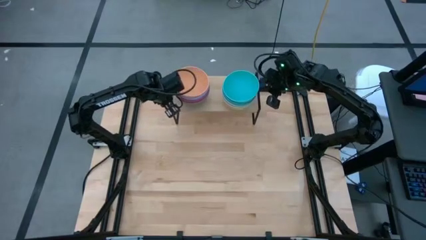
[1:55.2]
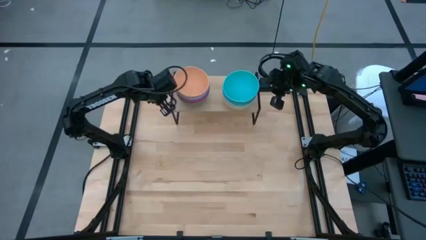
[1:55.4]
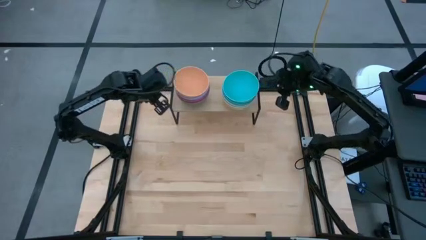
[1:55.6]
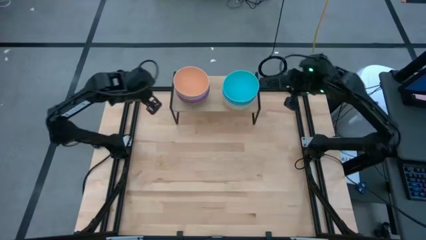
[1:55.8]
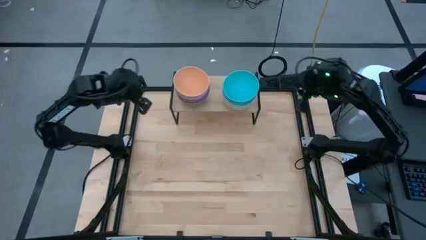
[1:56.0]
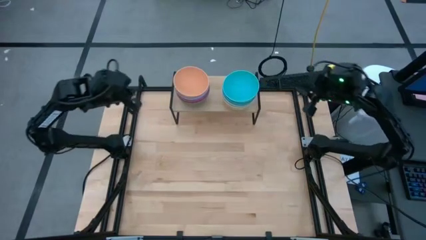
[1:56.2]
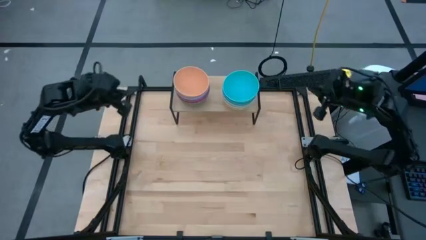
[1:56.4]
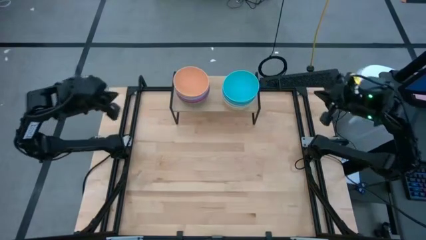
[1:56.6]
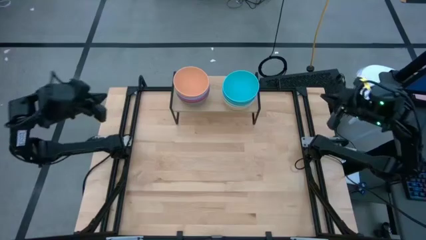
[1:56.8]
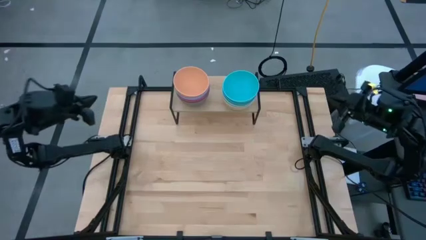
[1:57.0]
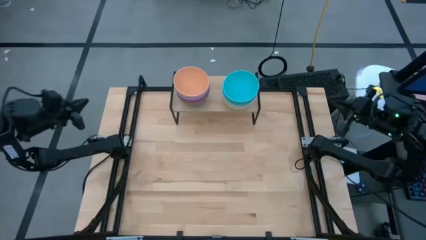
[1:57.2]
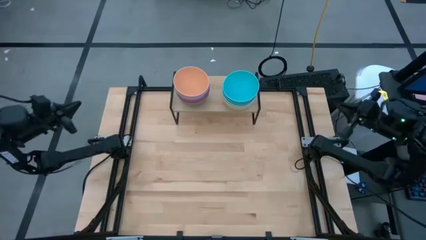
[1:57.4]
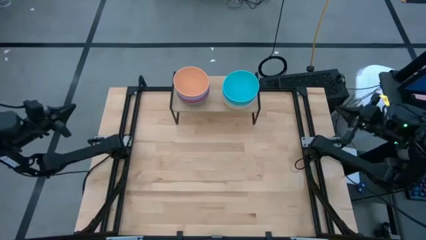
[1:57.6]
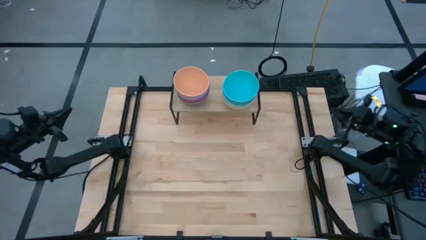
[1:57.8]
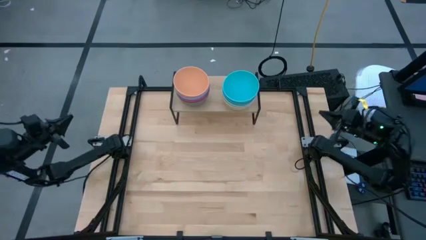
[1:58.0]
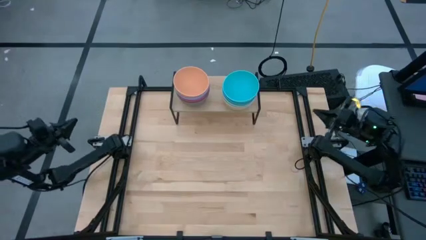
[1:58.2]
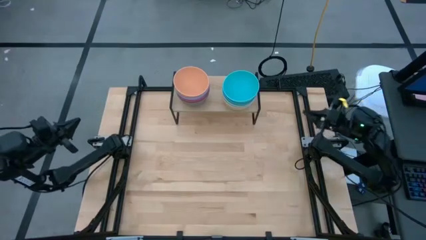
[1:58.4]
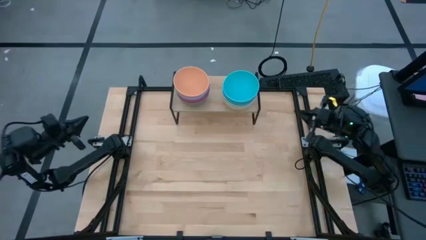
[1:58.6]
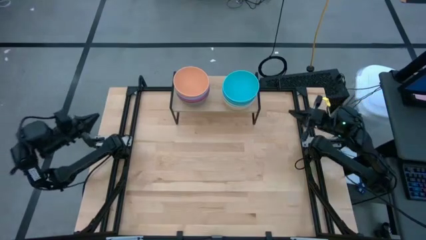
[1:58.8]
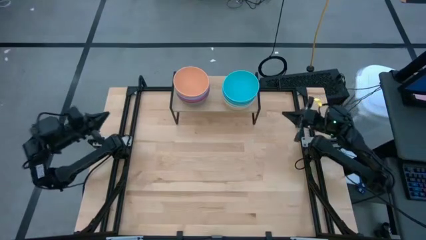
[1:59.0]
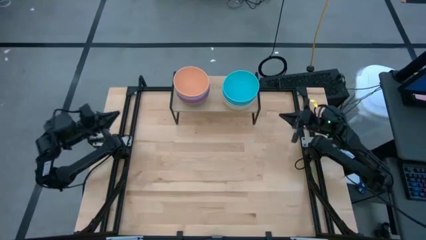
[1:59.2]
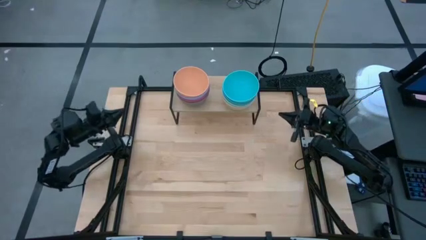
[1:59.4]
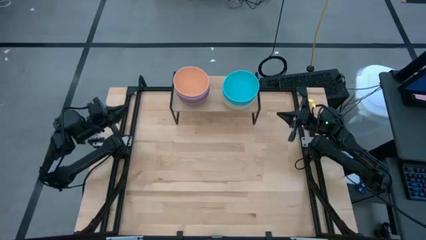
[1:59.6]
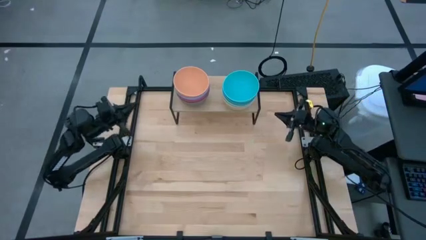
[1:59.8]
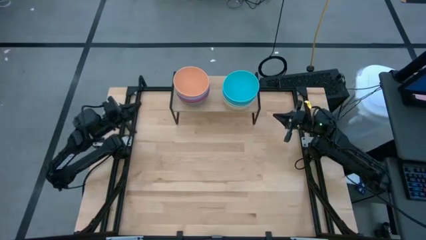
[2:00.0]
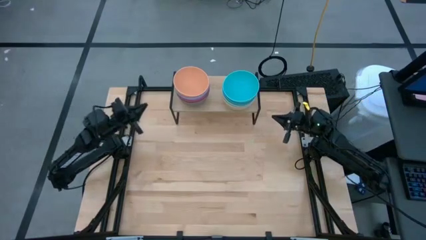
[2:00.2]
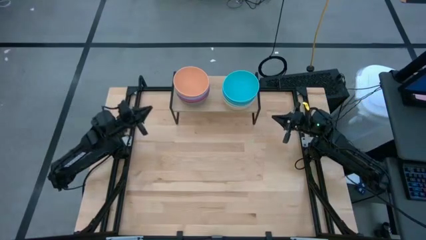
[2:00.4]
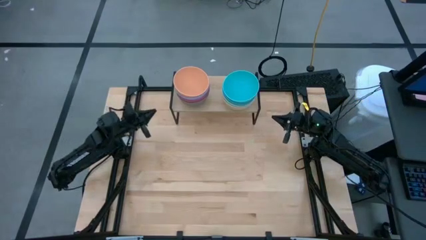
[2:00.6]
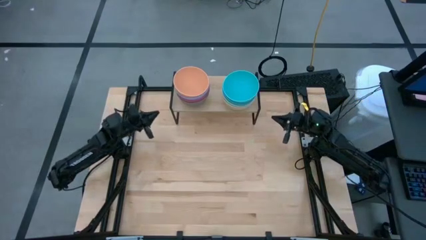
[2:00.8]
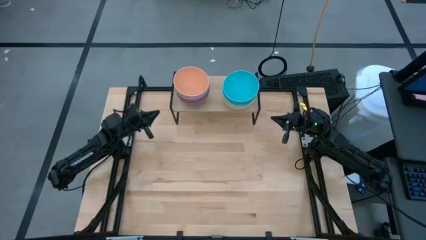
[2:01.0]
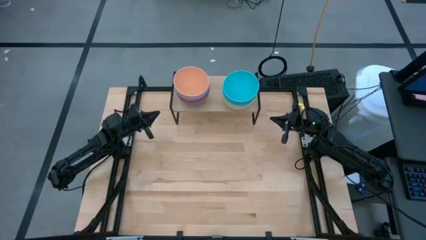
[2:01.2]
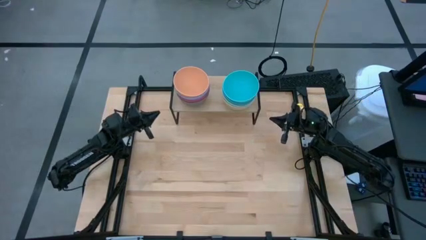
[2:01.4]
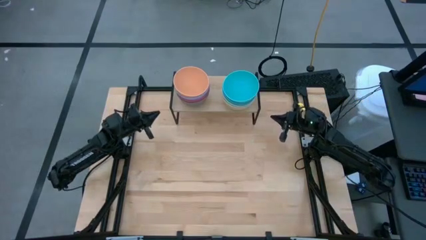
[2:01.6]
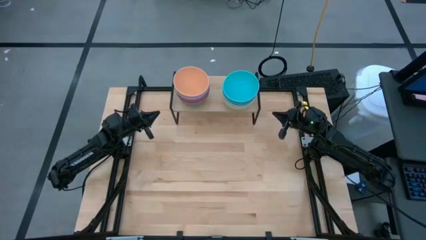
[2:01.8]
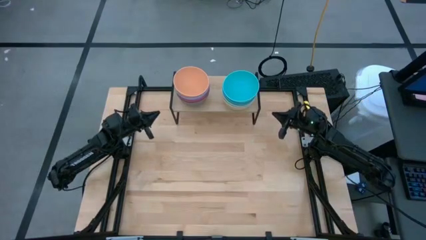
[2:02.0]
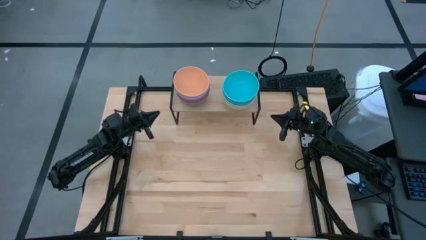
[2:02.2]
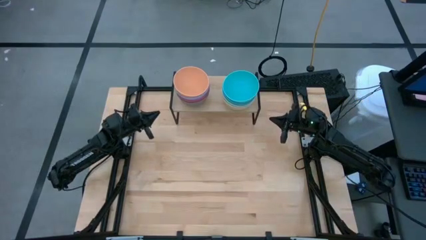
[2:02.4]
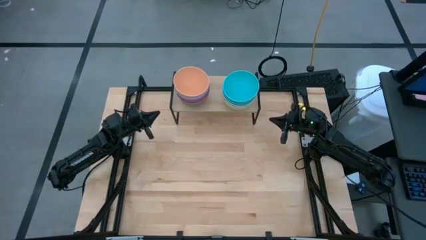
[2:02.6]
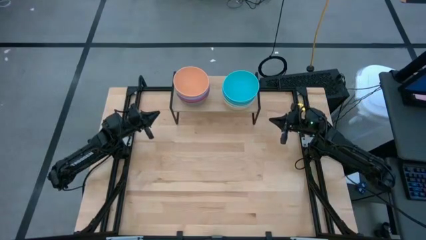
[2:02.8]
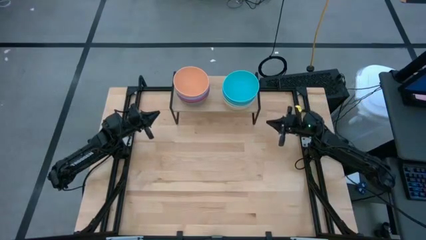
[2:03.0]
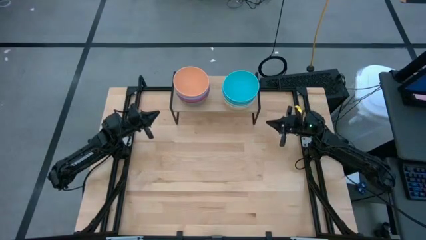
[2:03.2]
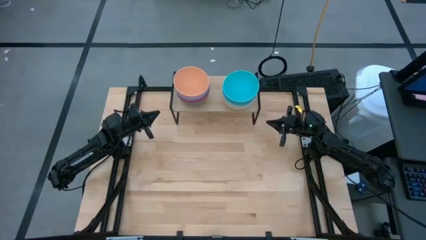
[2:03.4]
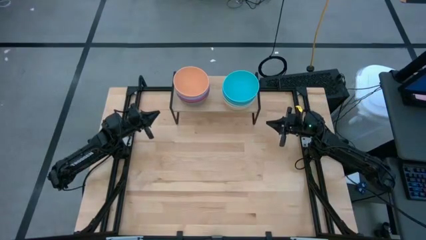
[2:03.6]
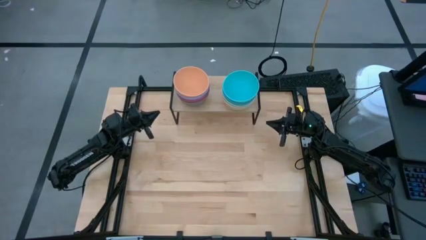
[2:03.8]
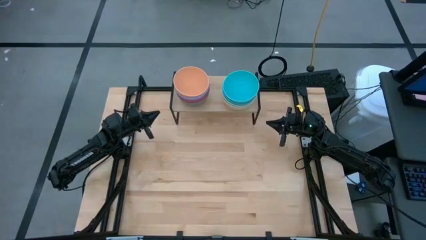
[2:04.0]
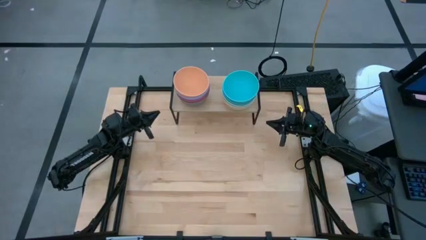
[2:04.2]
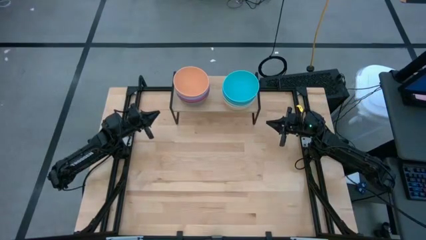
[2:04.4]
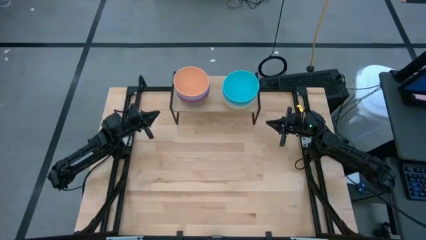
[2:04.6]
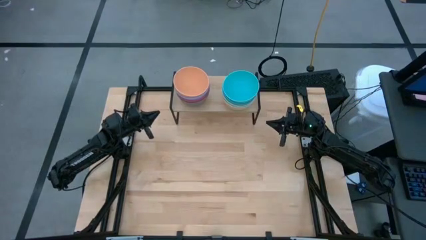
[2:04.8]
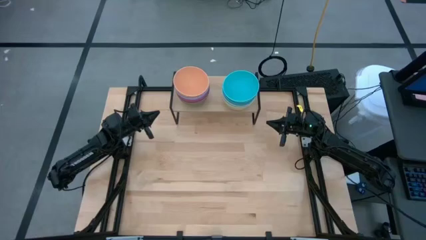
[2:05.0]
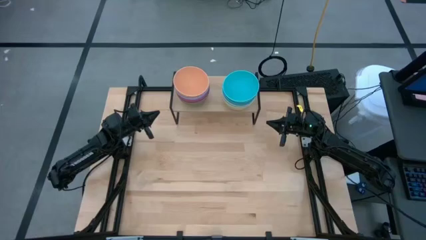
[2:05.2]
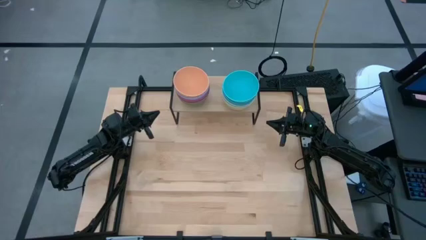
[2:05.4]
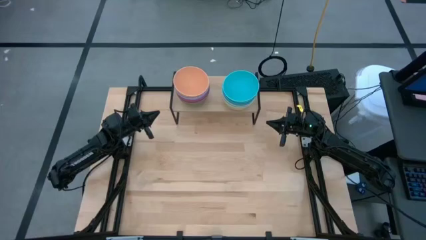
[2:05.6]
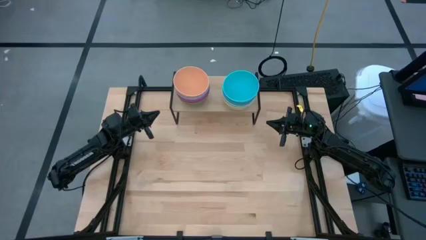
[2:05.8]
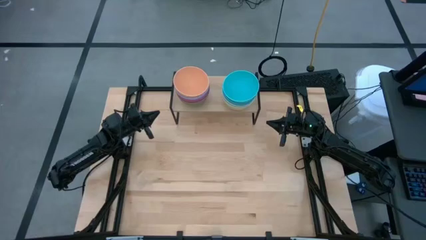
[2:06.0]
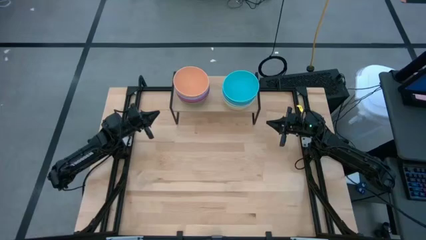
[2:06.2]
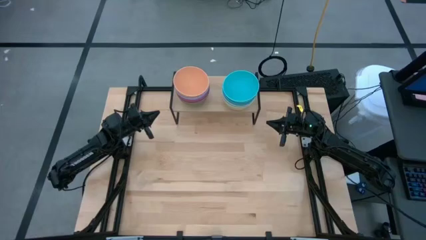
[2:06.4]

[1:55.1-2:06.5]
Task: Place and stack bowls onto a shelf
Return to Home Position

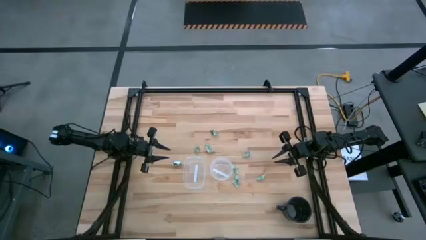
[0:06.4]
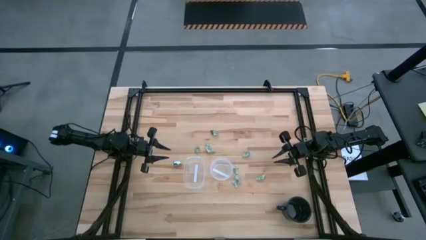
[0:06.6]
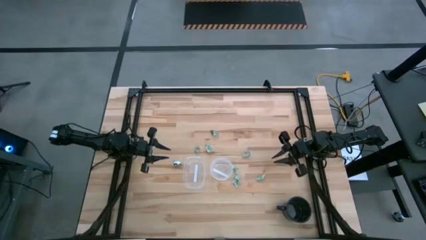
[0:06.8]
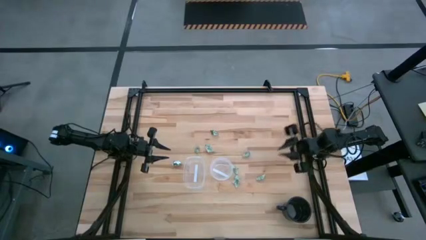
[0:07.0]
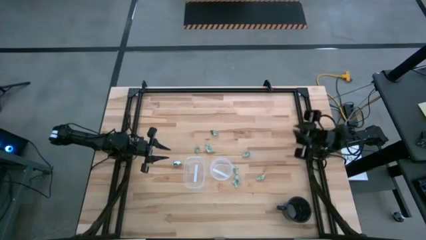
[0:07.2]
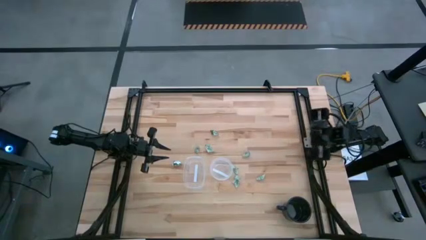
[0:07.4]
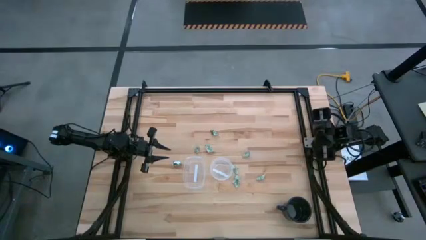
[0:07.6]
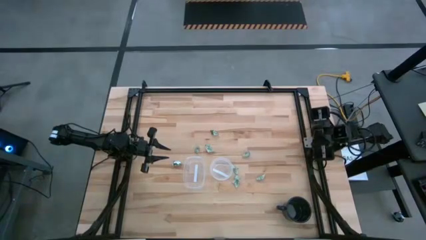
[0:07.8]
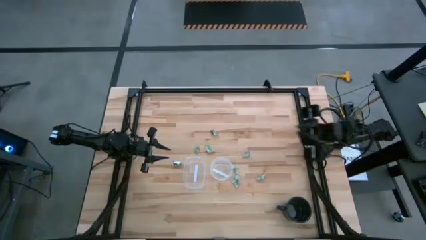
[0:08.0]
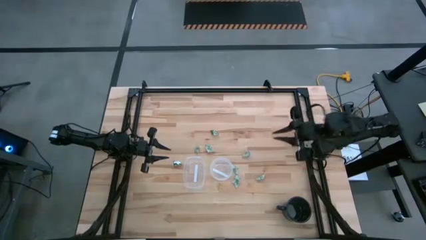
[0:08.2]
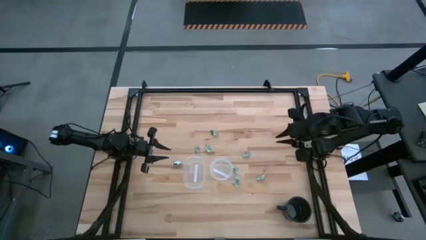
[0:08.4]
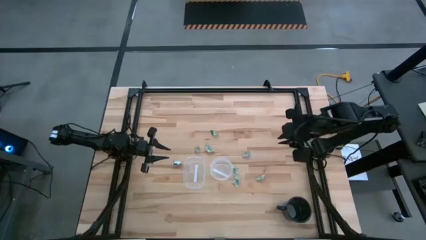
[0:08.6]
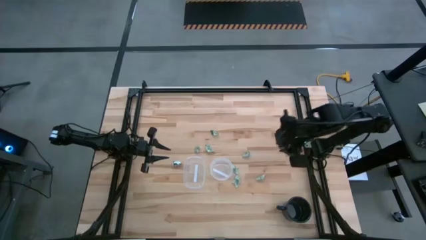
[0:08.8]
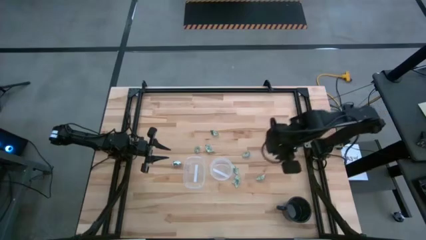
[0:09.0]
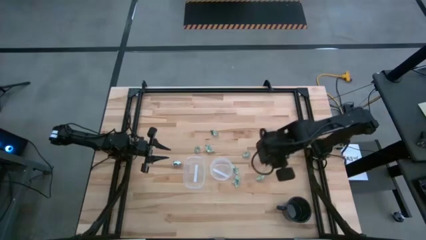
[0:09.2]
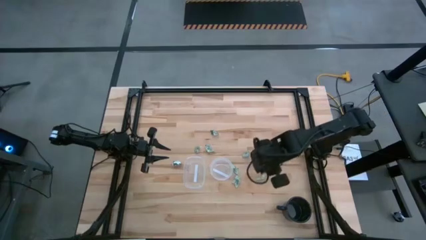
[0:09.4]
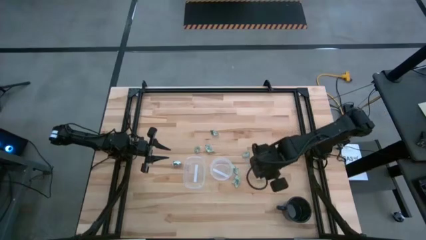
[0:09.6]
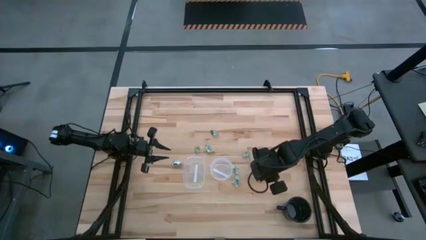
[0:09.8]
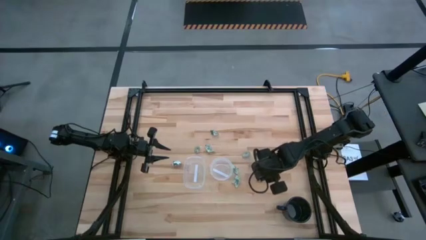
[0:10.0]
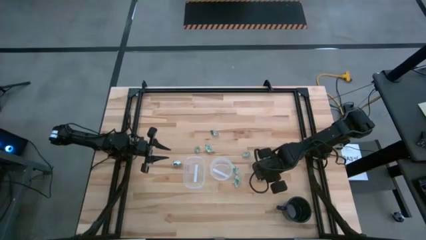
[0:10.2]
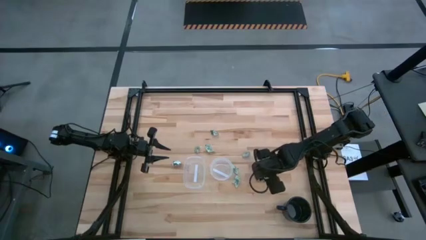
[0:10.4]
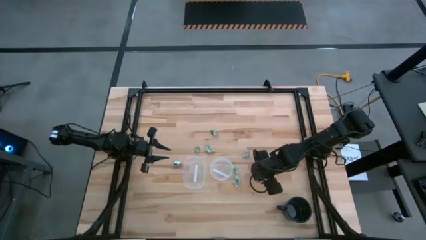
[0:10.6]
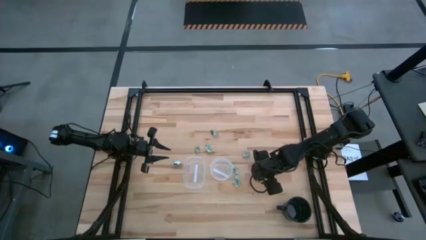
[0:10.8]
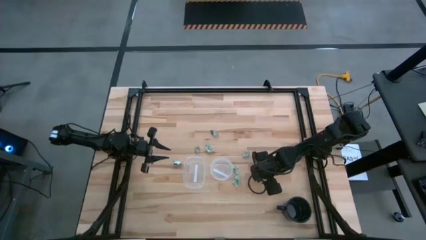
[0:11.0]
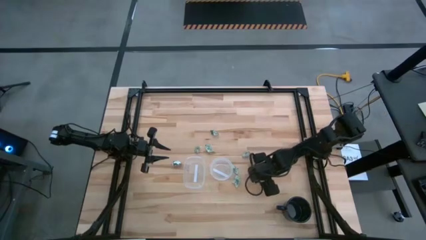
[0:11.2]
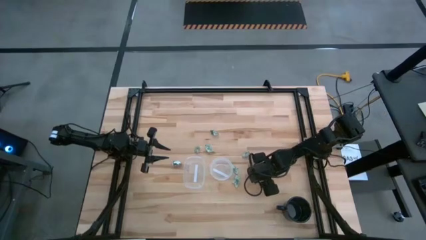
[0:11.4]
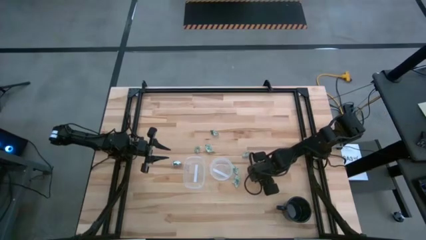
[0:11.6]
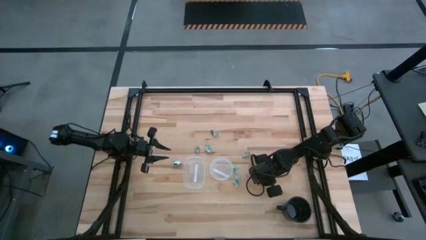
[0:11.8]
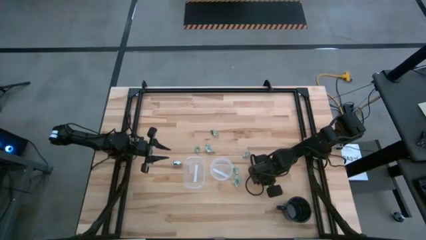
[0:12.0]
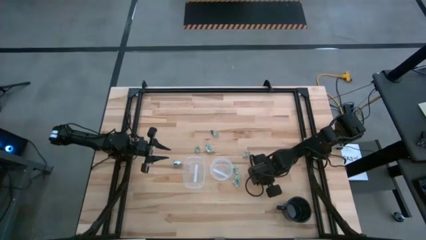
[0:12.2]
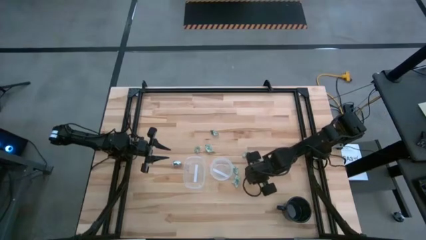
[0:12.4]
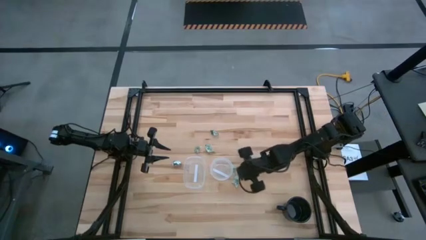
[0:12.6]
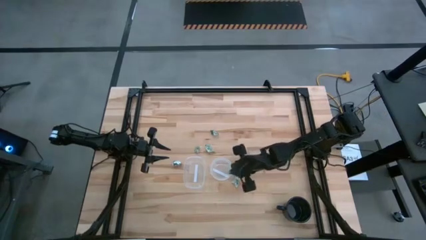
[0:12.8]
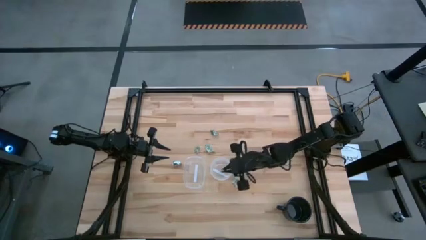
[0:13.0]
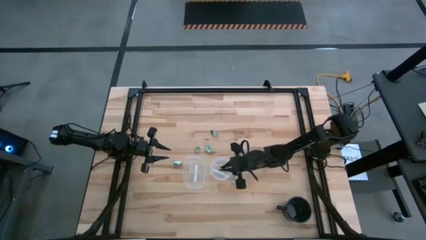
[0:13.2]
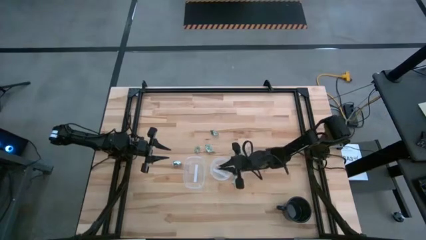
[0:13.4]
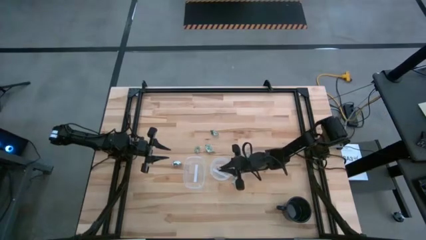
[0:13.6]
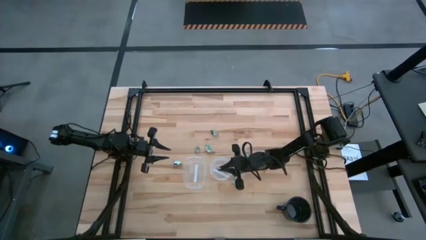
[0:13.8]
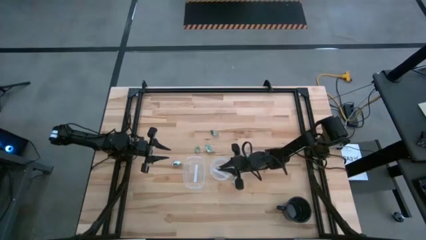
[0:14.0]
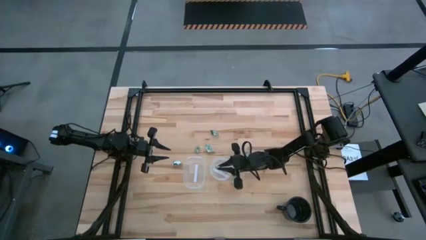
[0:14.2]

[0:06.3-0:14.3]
Task: Pick and place items into bin
Put the stevia packet into the right transparent bin
